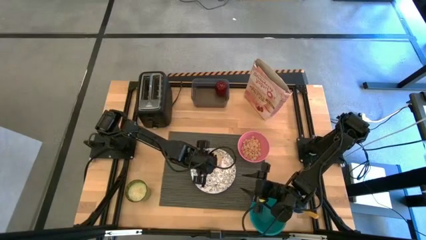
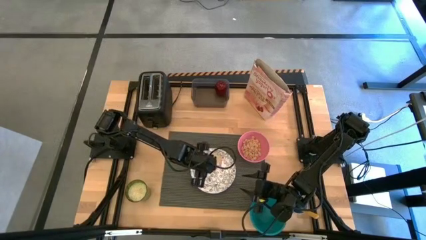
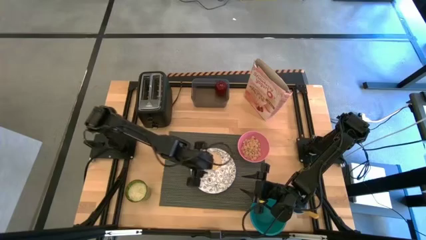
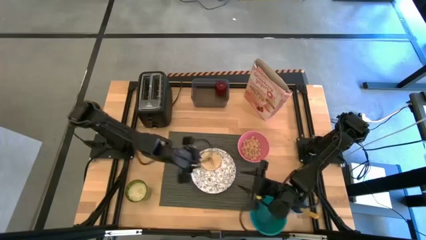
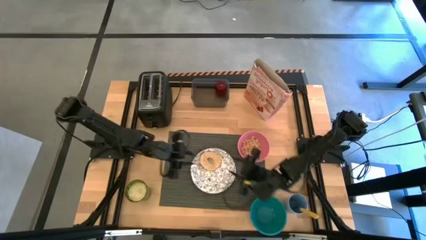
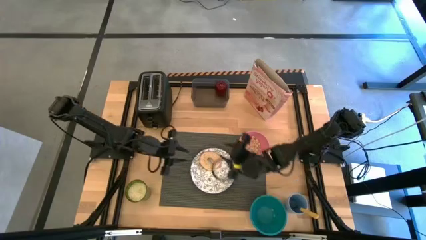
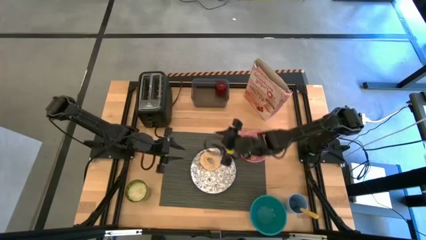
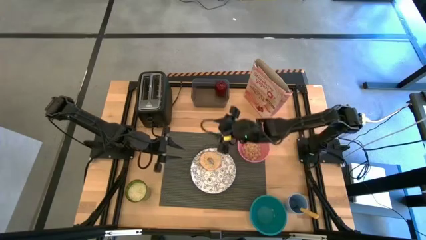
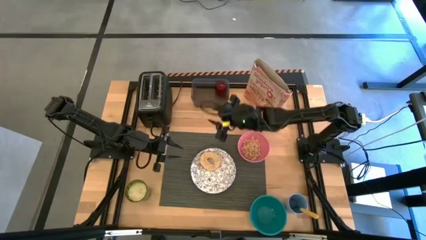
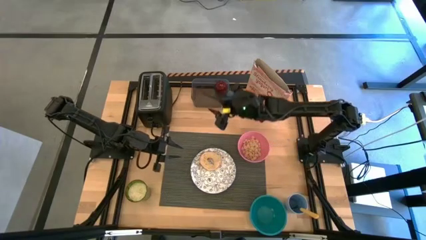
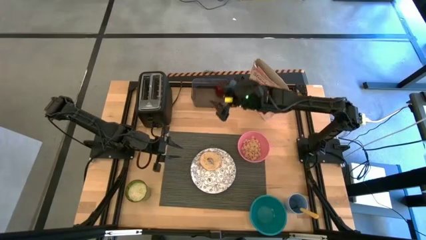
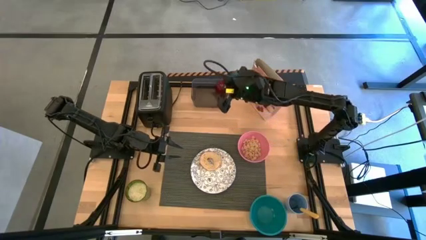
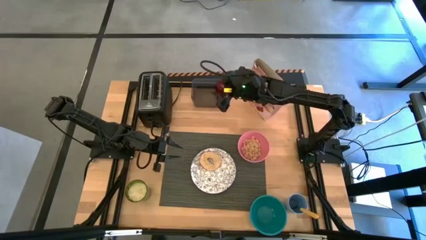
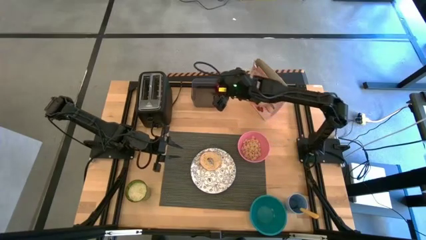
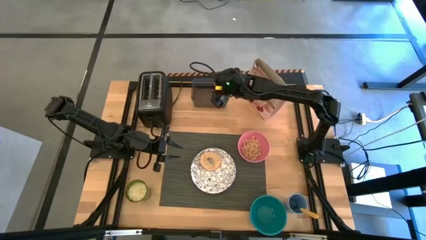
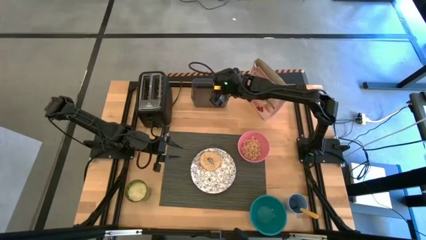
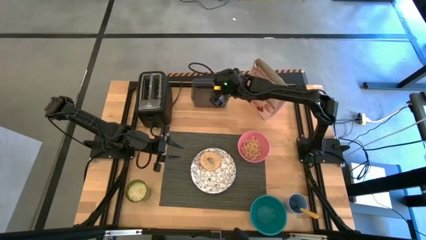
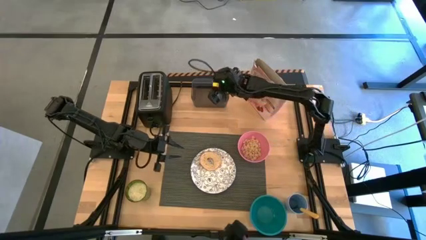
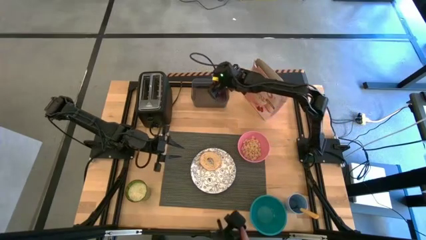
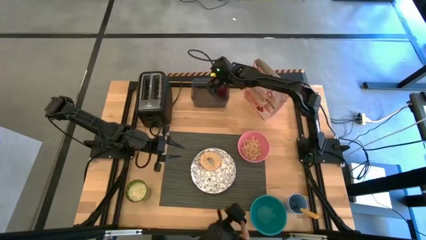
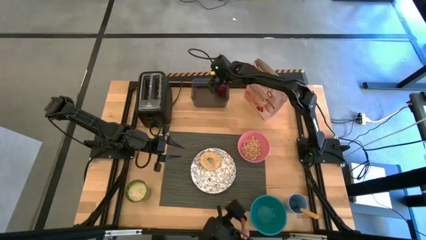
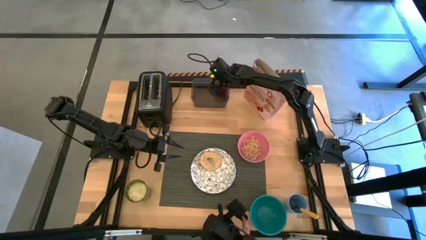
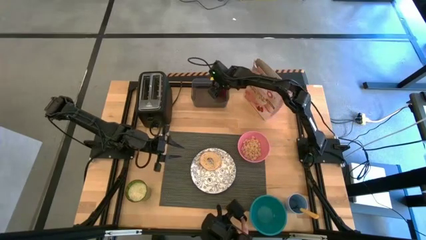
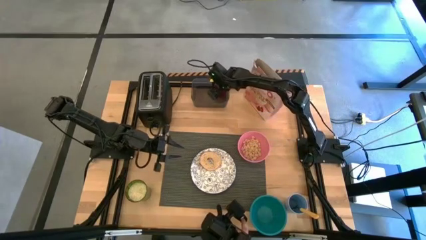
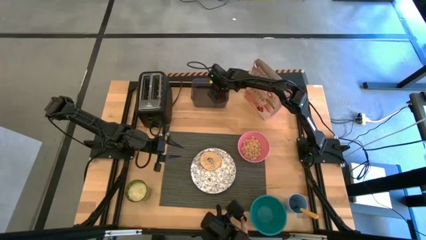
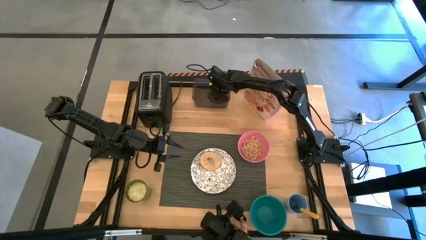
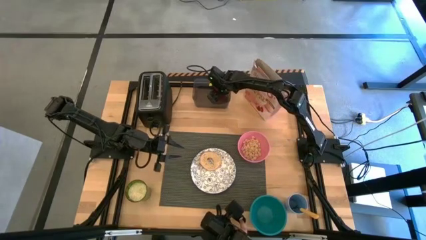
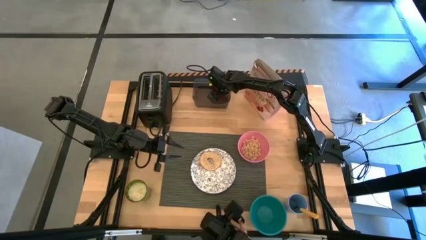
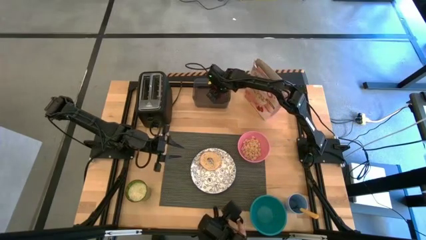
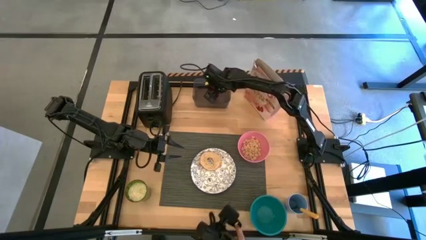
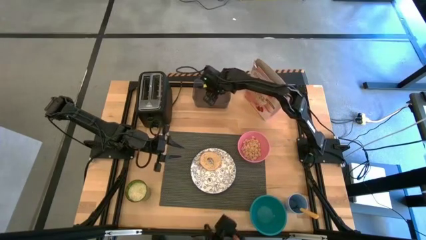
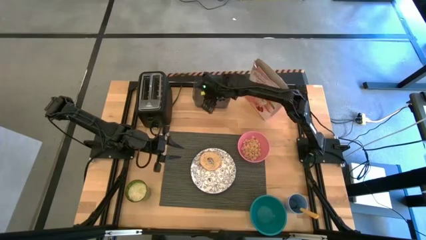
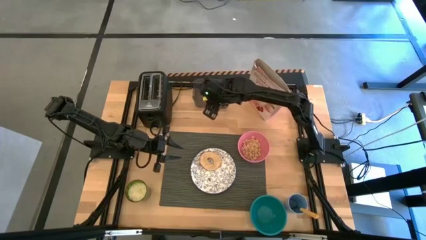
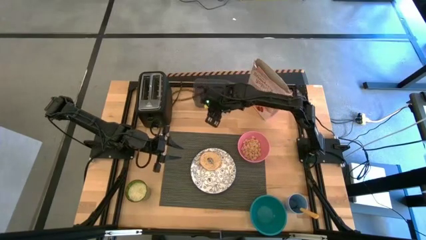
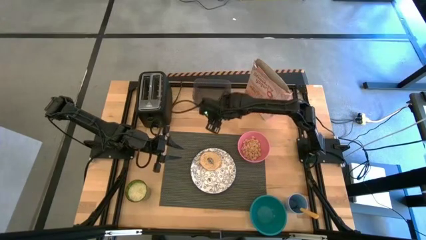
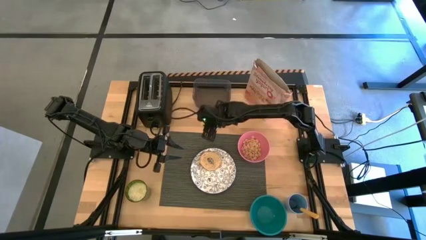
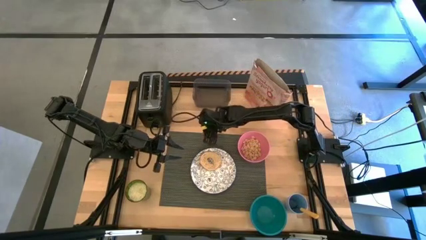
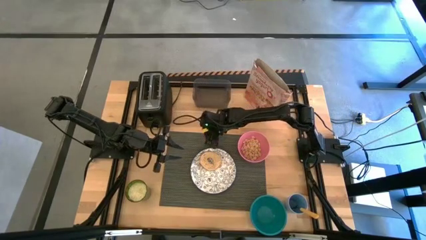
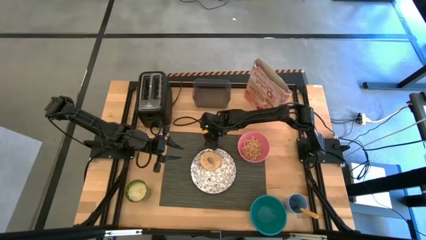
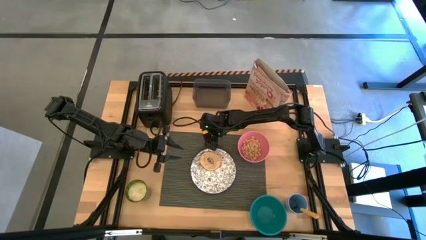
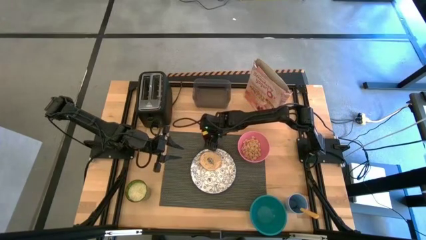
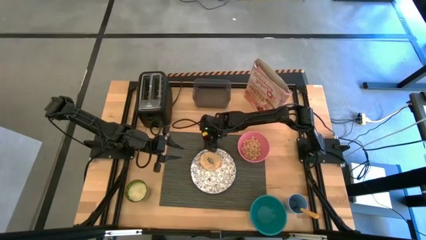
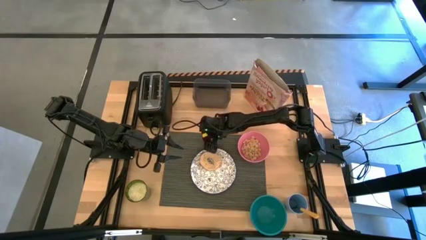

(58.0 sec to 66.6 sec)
Task: Arrange a breakfast setting
Put the apple on the placemat

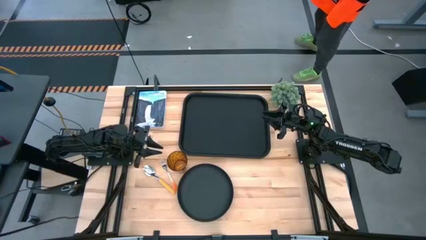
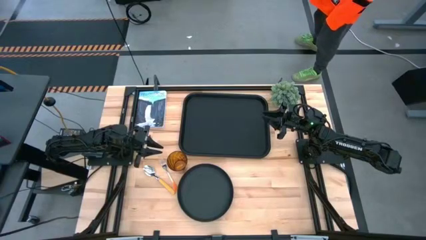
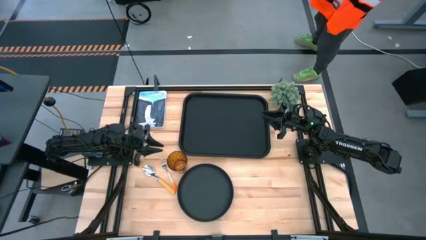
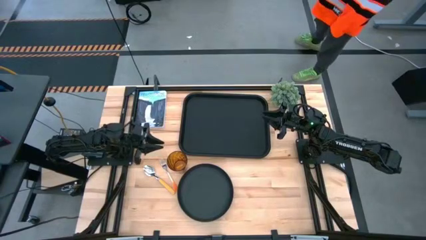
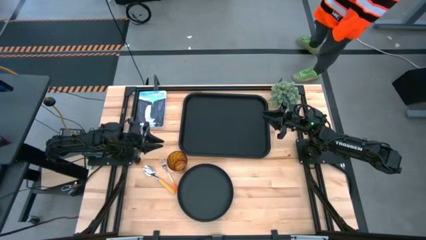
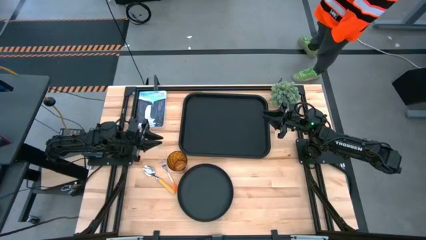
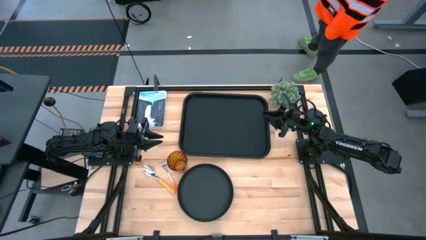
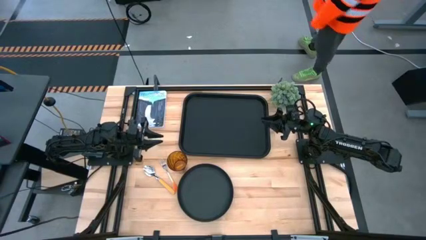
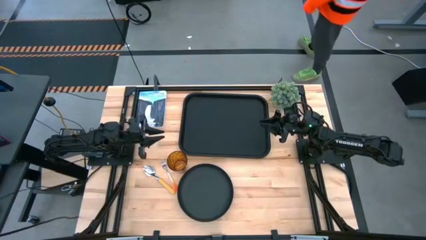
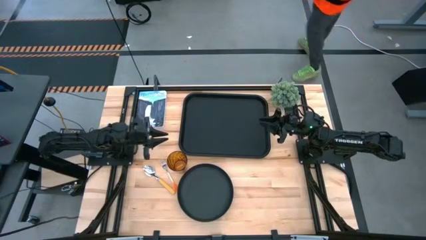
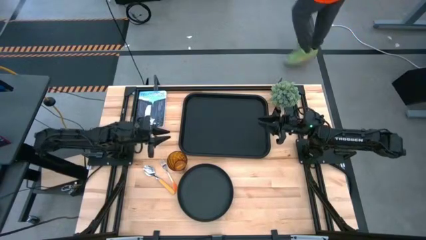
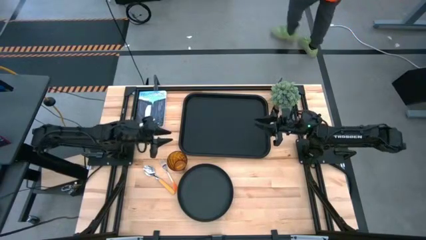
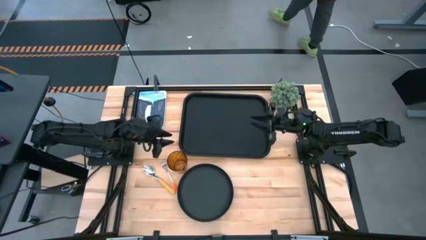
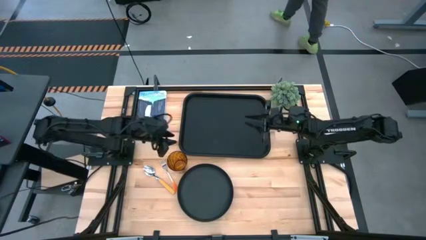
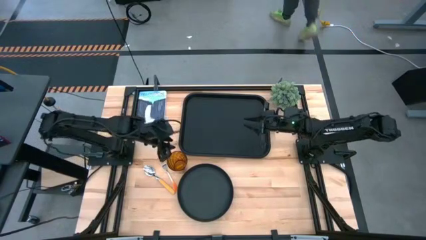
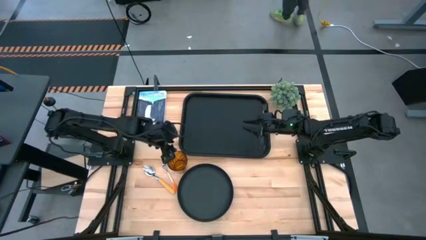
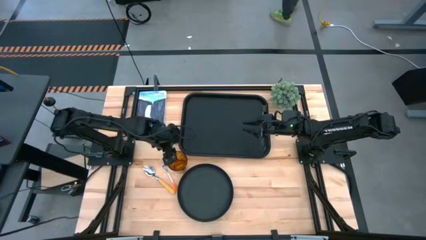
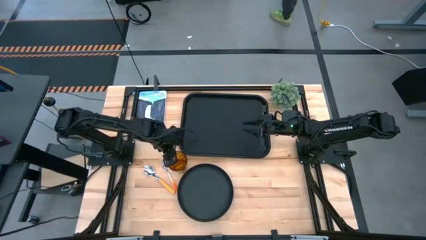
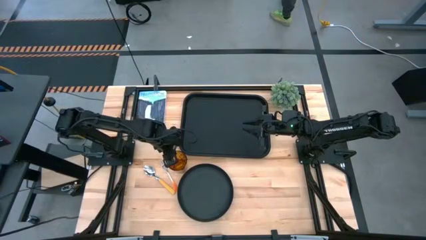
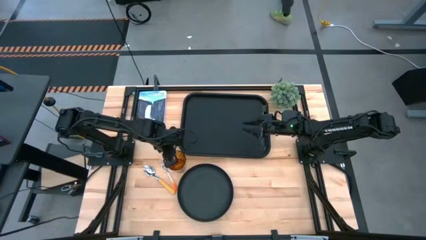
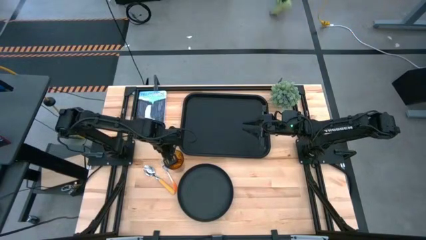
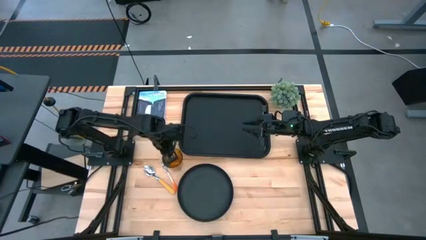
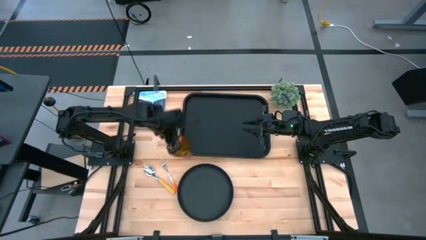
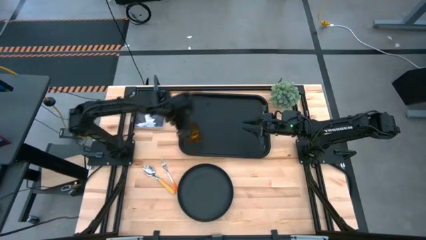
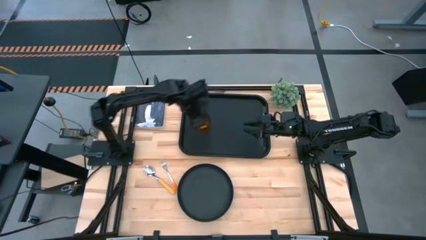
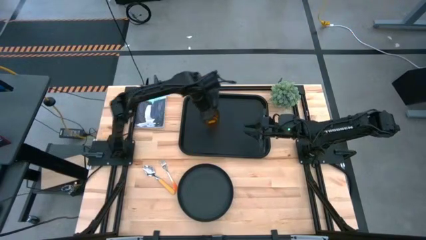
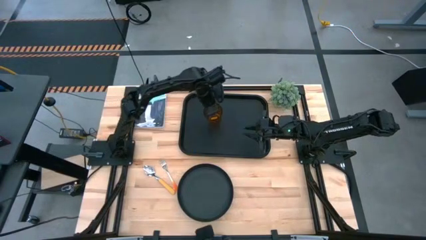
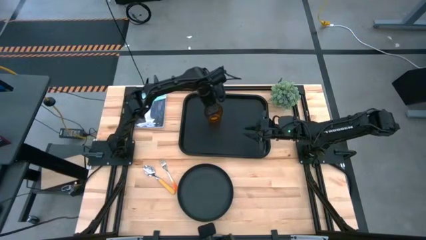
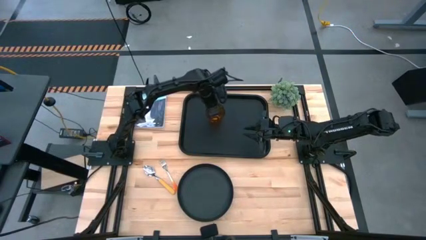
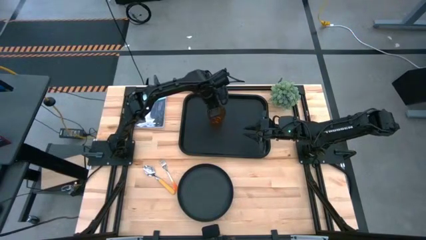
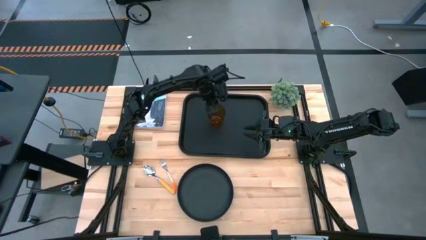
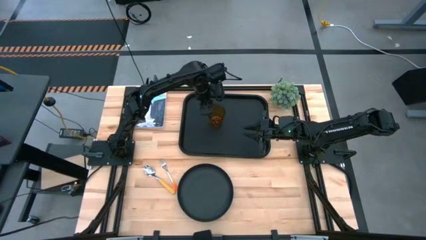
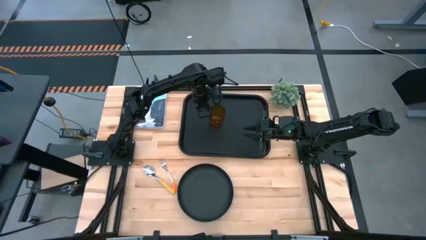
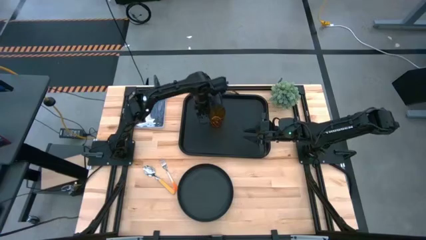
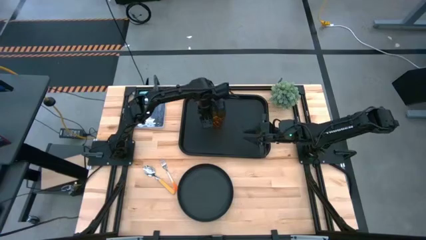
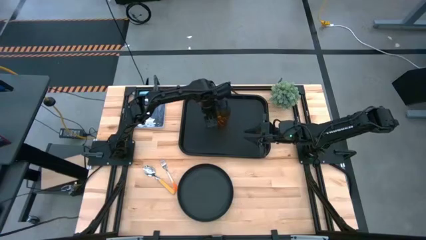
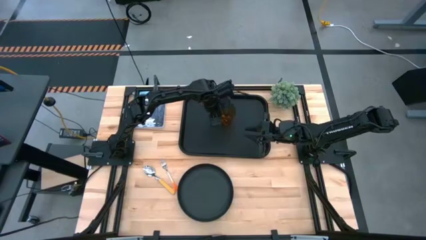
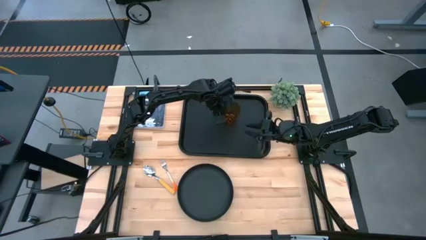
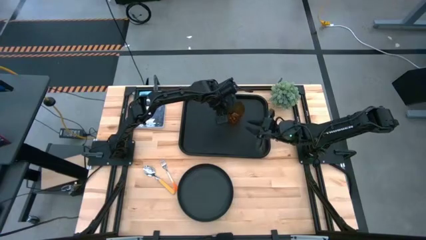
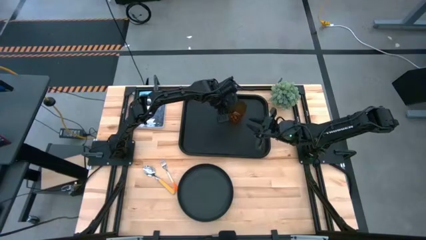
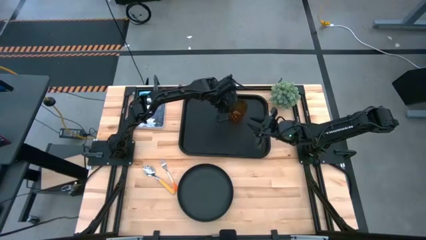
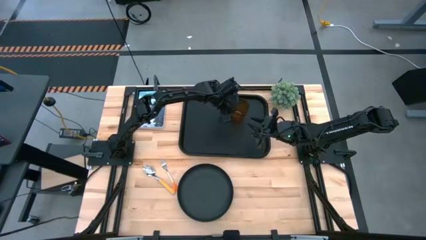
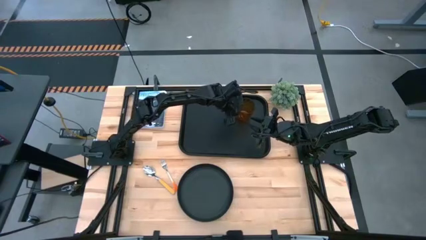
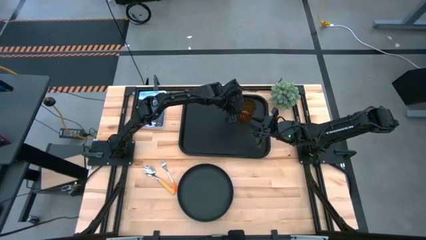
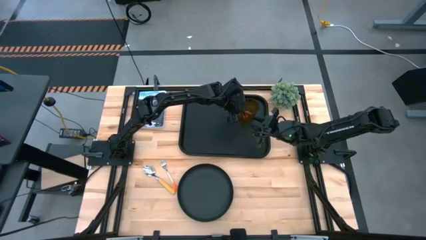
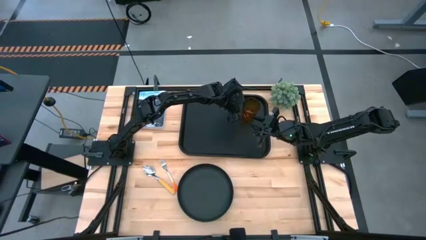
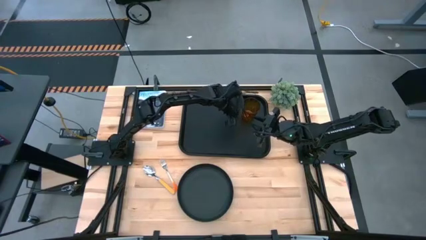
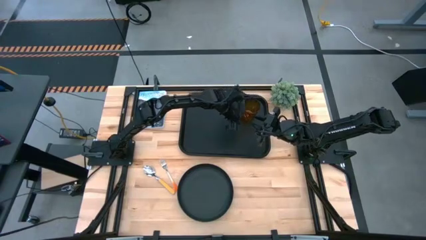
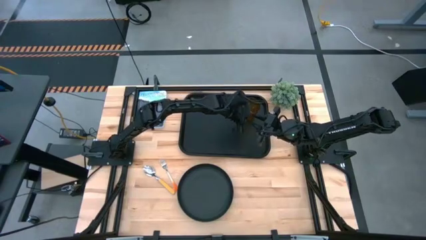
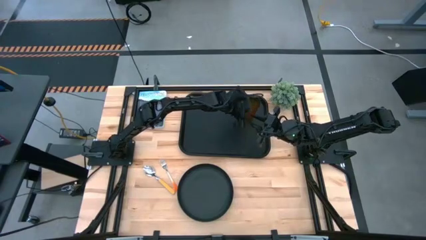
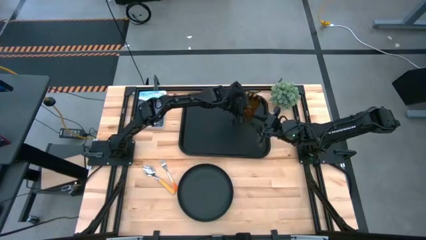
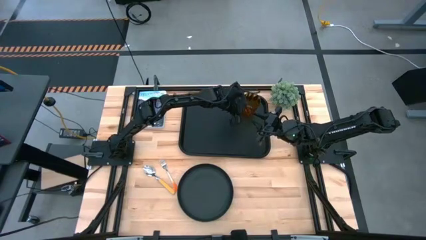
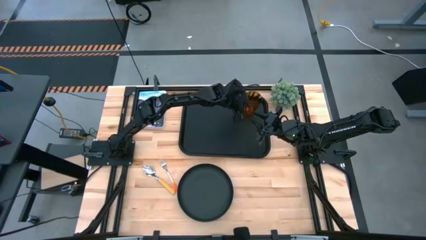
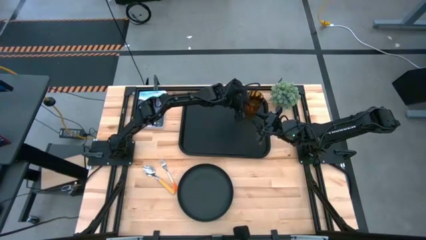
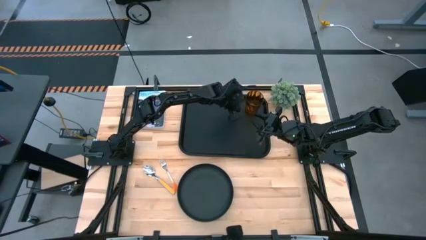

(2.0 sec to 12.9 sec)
Task: Pick and place plate/cup/fork/spoon on tray
Put the brown cup on the black tray
